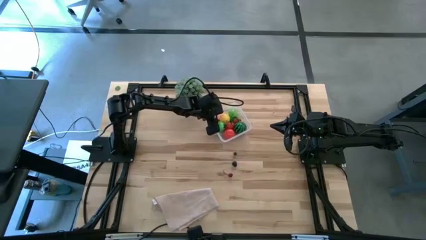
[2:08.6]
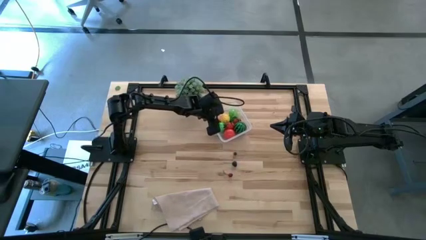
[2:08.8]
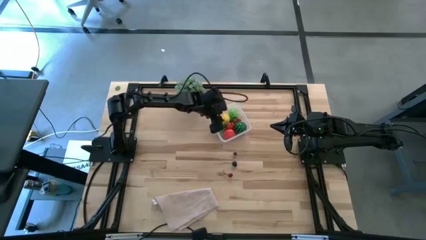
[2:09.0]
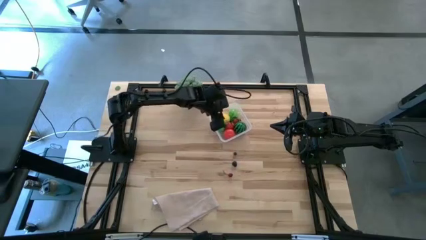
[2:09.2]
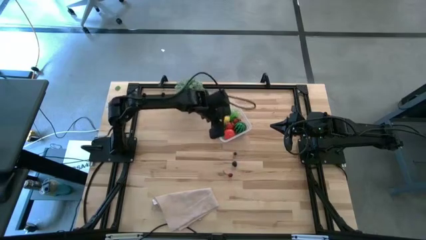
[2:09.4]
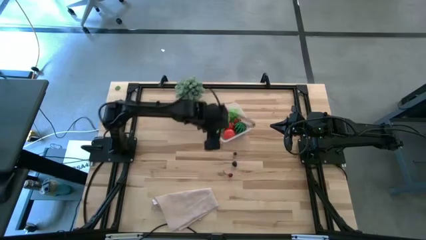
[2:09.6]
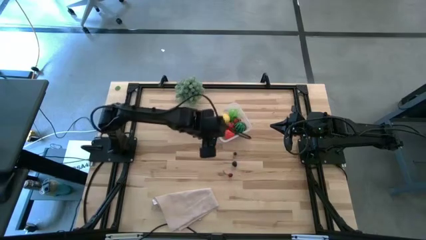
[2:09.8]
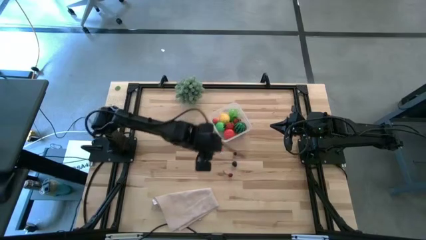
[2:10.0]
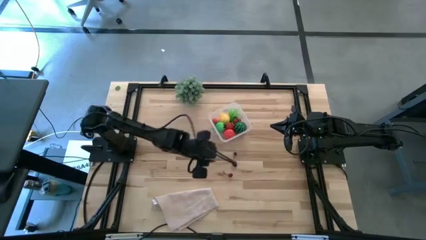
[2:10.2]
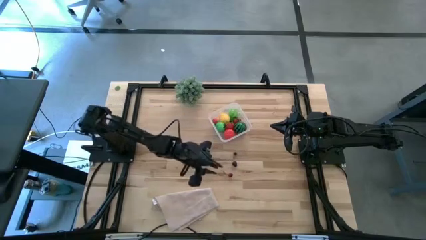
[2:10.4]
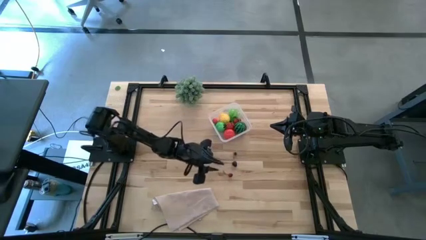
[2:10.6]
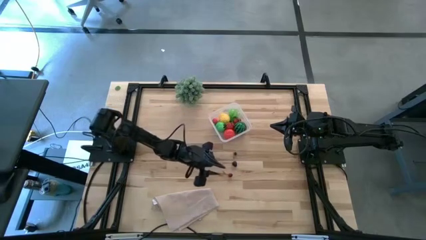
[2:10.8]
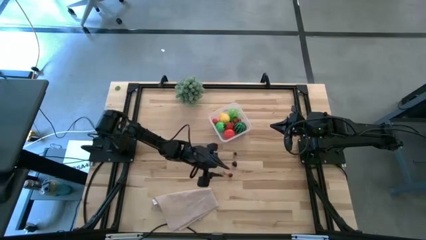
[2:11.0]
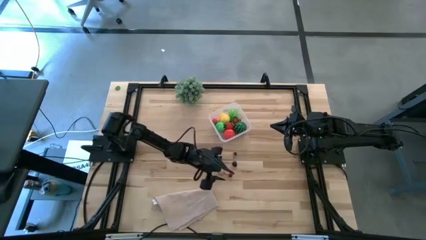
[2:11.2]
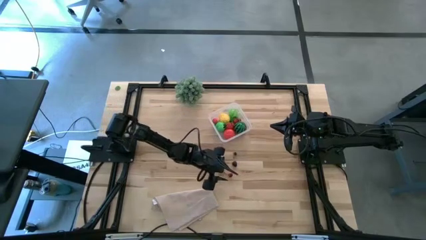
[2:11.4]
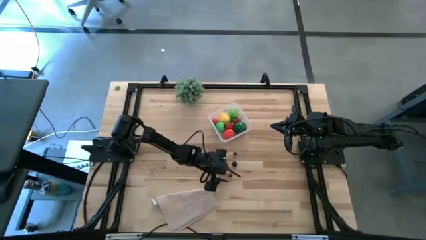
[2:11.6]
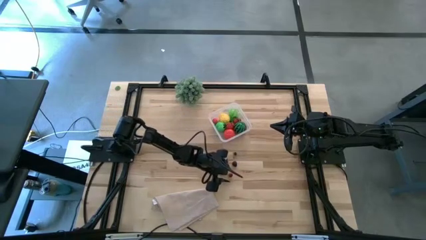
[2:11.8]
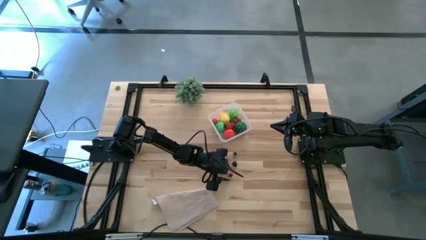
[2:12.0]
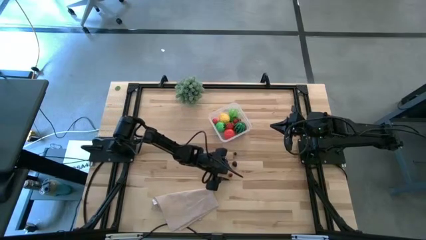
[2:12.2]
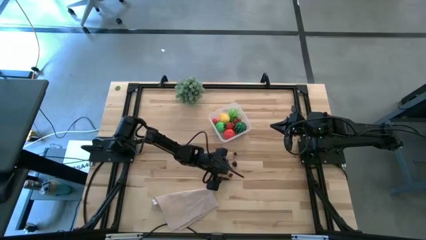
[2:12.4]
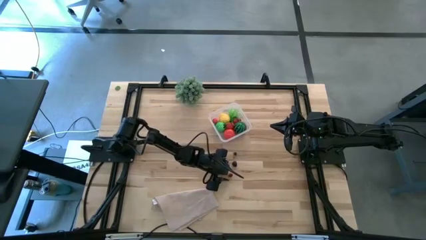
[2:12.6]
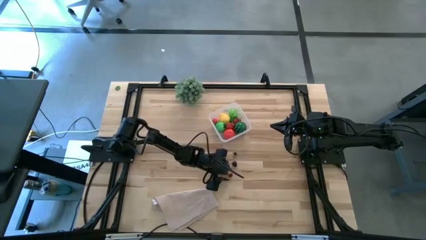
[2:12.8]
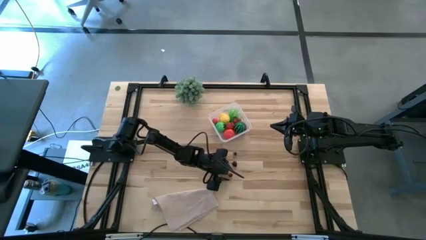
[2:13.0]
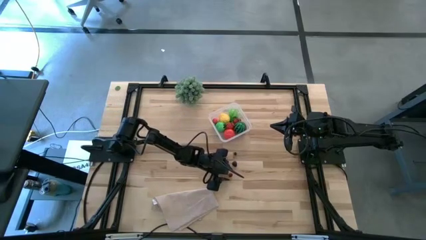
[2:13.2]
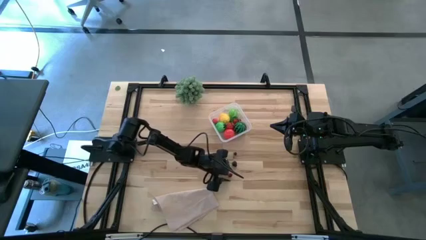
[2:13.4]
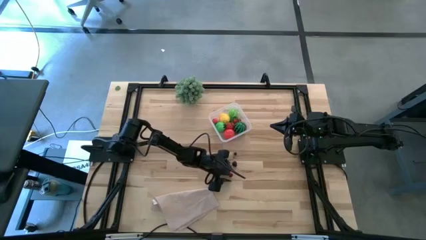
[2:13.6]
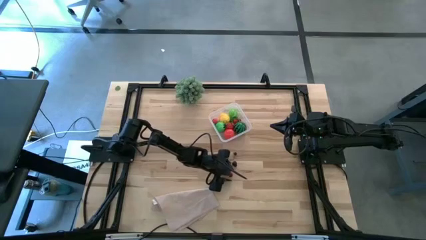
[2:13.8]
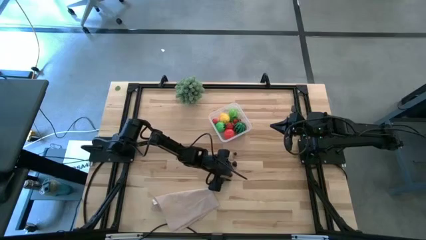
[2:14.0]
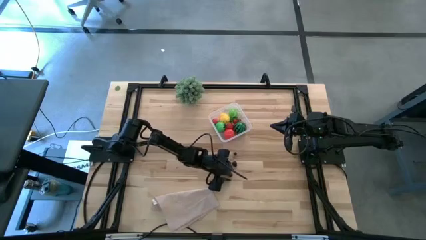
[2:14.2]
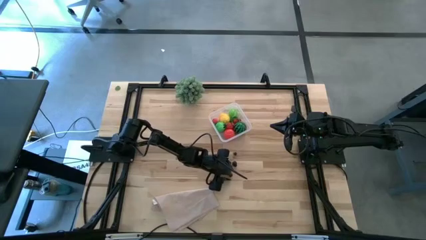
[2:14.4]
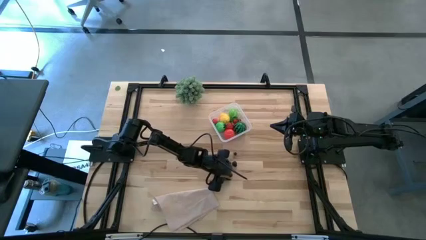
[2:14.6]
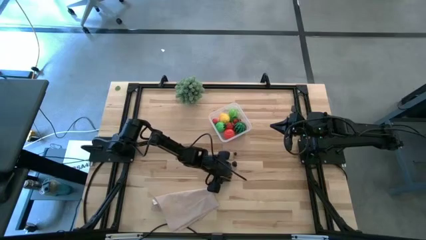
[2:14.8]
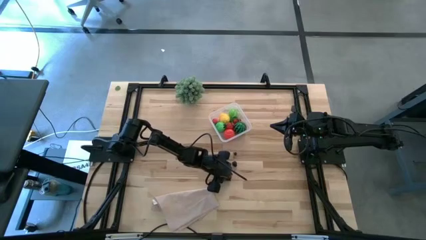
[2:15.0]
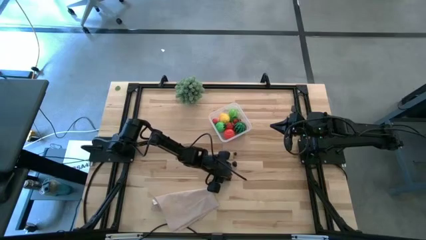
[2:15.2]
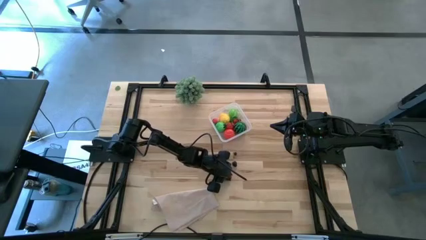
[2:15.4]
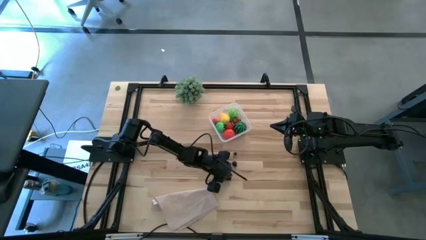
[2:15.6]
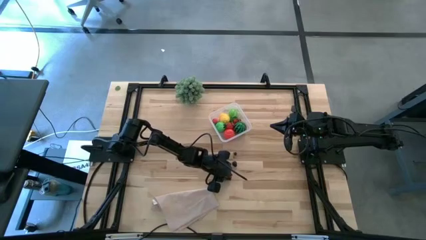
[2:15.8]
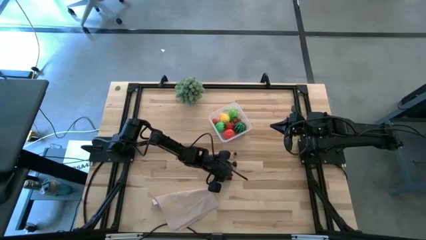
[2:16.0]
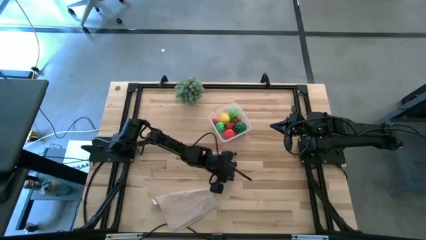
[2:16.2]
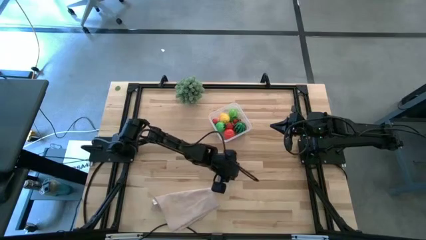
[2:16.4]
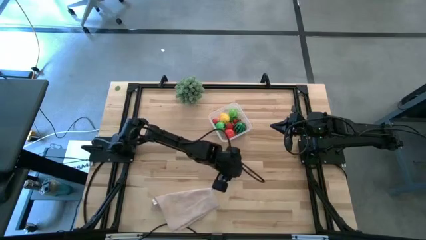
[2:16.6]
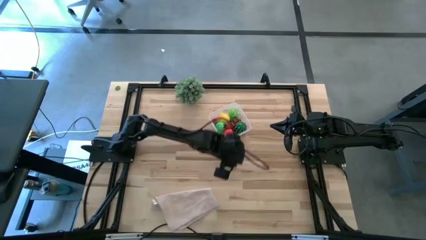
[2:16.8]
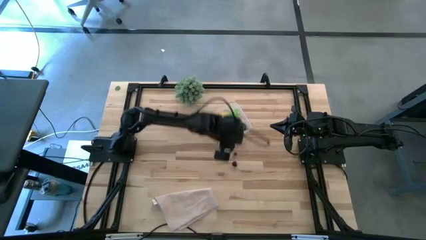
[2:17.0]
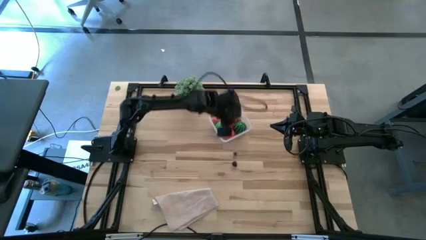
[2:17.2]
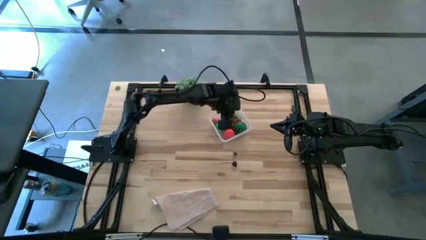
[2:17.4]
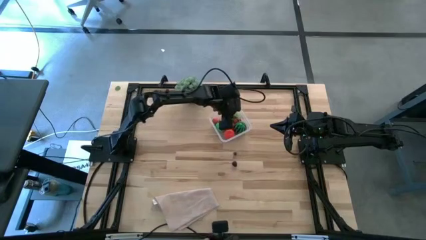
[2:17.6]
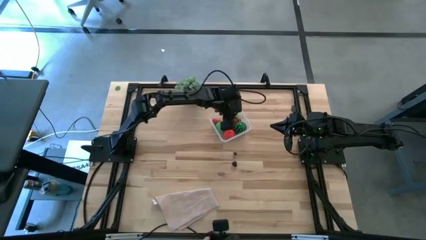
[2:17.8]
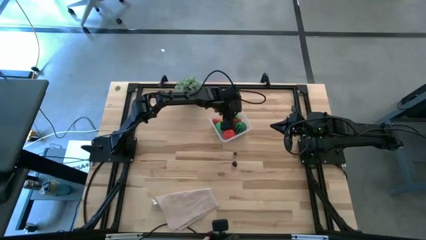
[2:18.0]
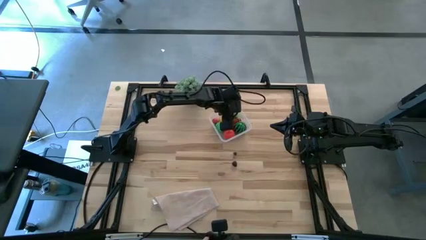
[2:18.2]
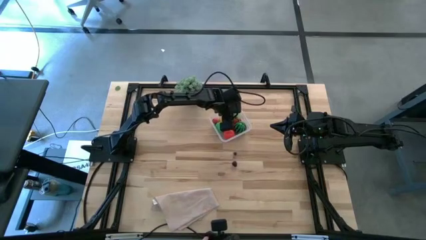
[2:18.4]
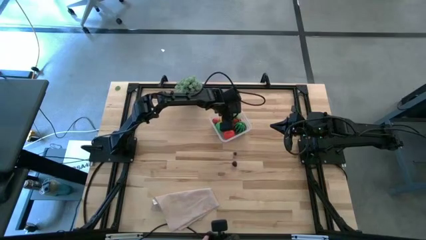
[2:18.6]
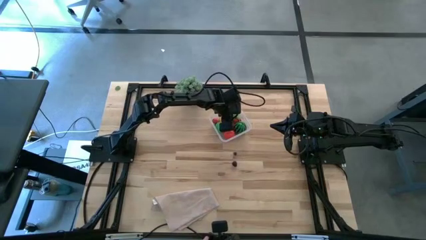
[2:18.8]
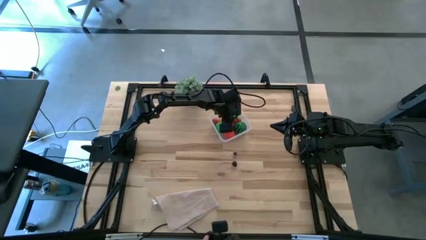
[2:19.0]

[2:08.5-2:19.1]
Task: Pick and placing Produce into tupperware
Put the red cherry into the transparent bin

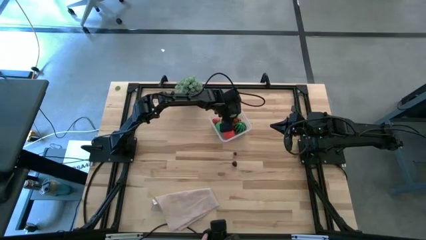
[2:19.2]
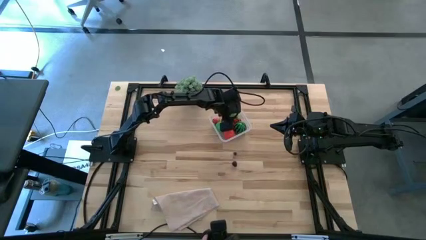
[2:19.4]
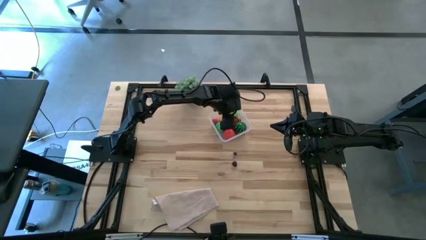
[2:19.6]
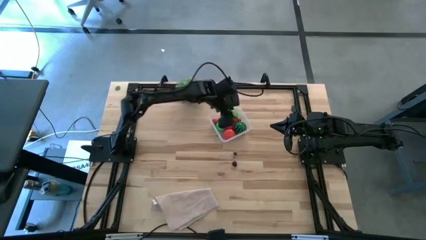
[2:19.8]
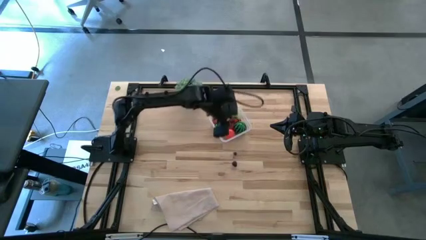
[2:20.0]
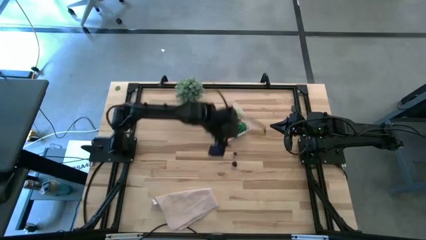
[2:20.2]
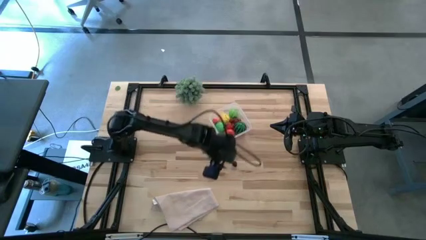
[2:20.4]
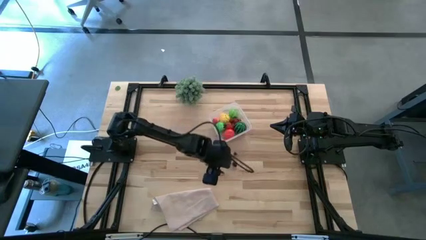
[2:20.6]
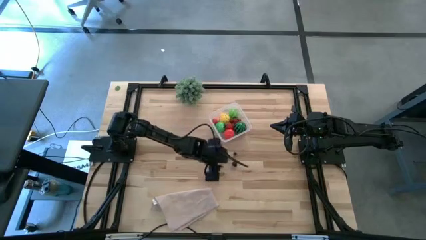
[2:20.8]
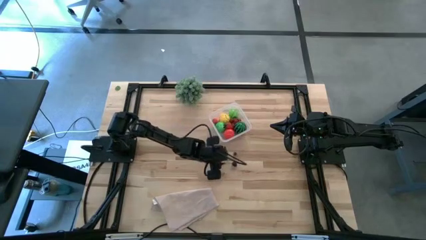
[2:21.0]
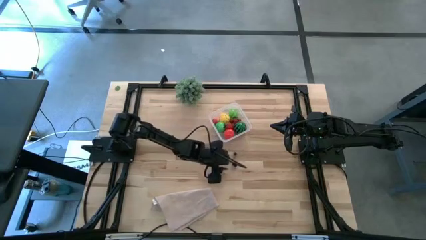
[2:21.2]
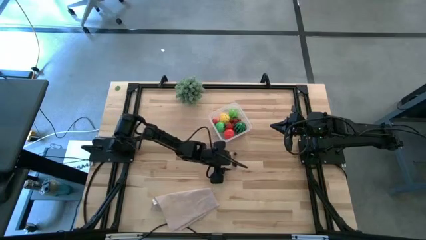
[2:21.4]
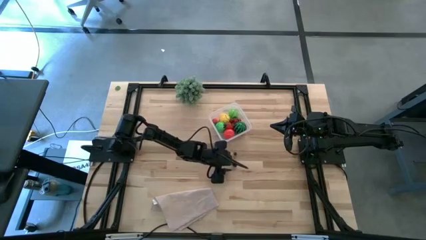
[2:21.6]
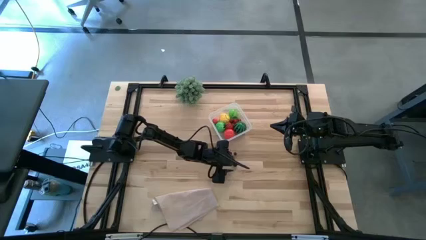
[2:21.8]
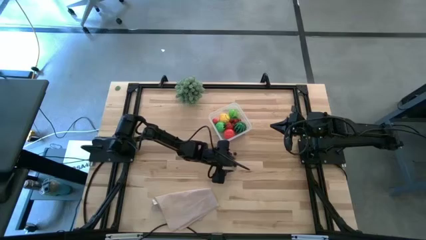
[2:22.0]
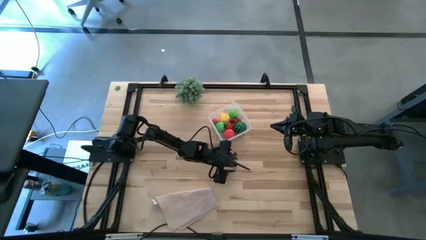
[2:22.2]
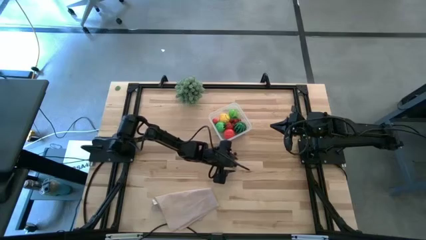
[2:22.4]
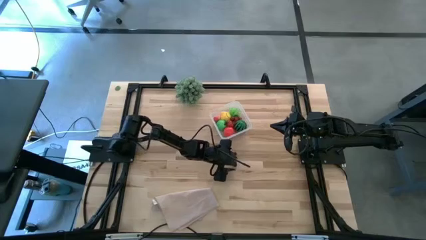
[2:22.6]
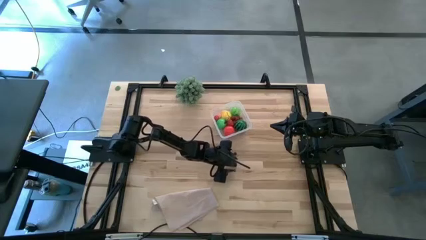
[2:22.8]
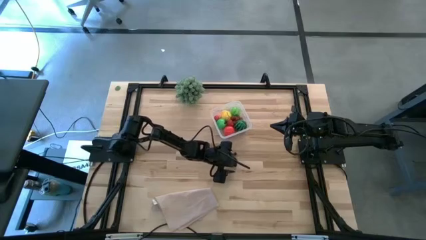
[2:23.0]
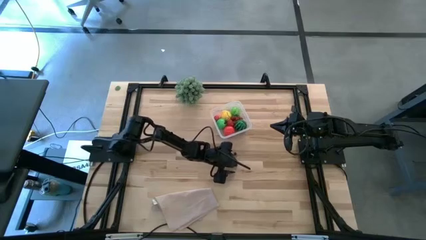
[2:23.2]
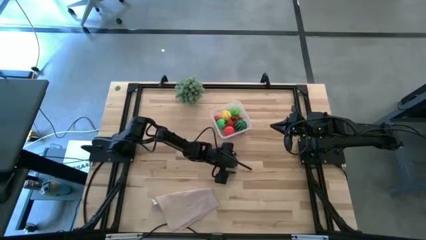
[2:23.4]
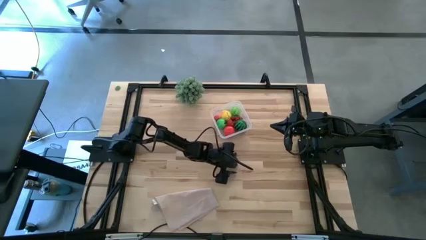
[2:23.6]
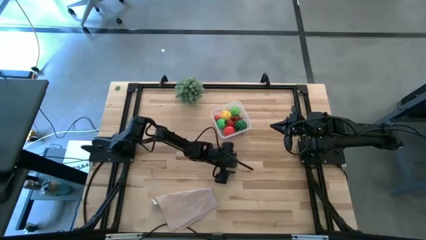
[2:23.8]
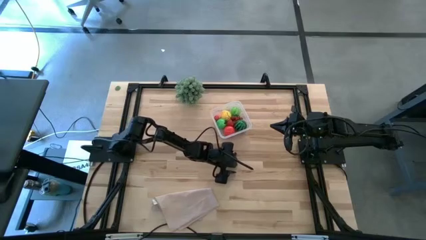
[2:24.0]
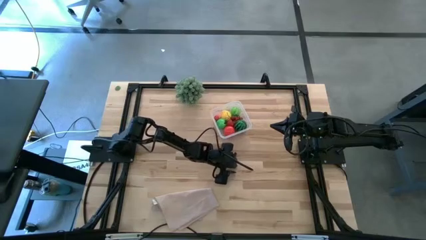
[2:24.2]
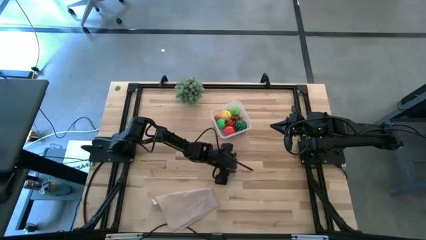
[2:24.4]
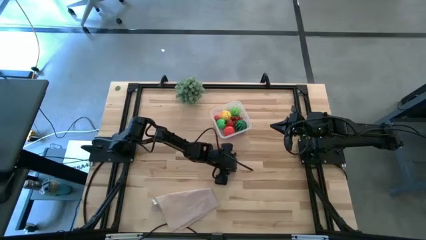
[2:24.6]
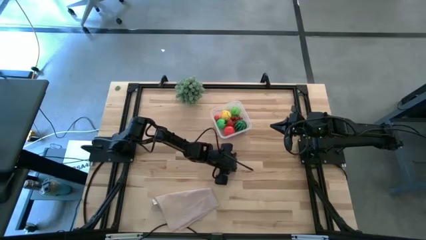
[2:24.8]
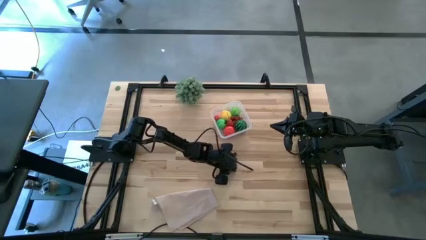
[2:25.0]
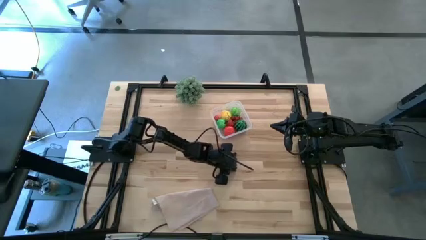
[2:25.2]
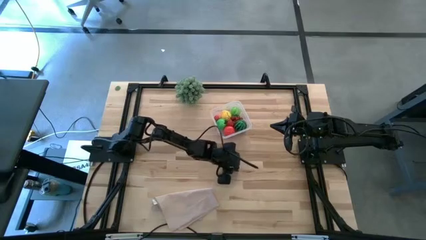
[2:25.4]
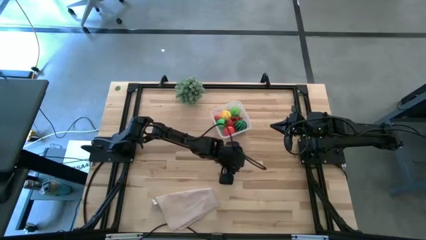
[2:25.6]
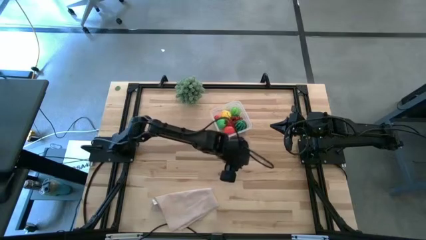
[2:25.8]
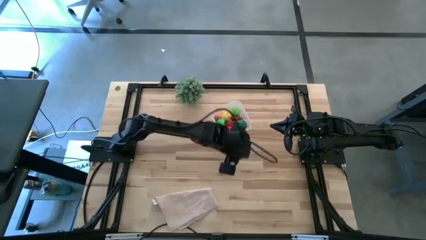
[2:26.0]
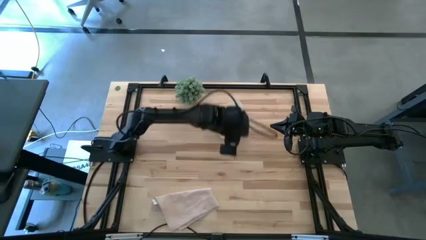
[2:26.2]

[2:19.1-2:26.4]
Put the blackberry into the transparent bin
